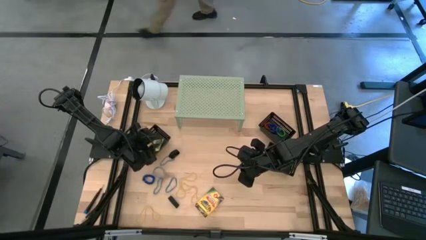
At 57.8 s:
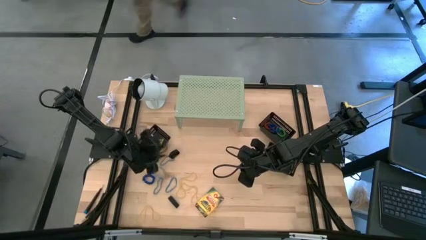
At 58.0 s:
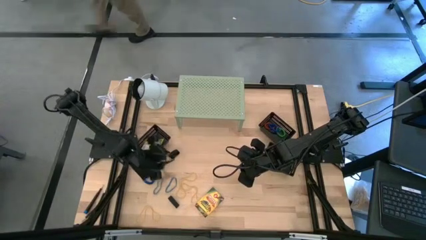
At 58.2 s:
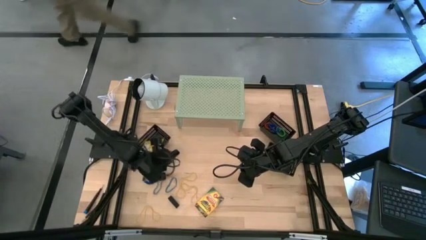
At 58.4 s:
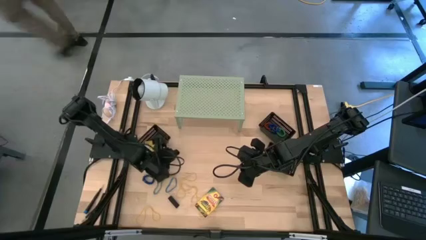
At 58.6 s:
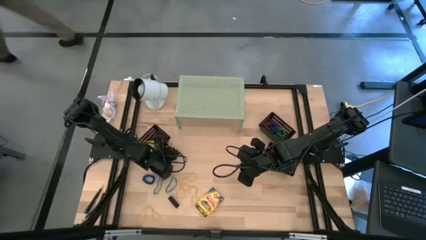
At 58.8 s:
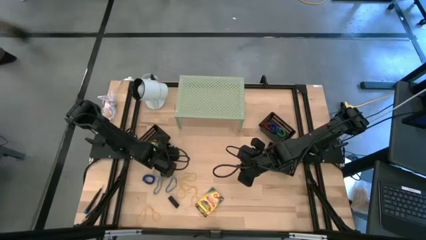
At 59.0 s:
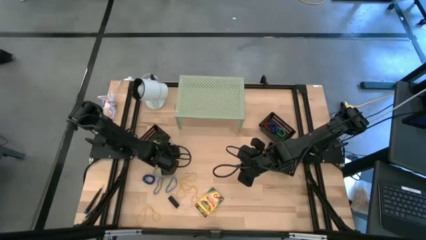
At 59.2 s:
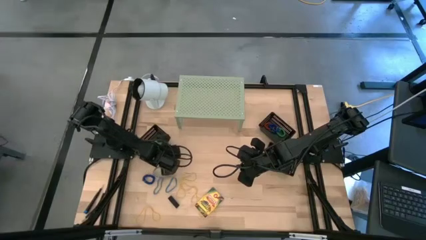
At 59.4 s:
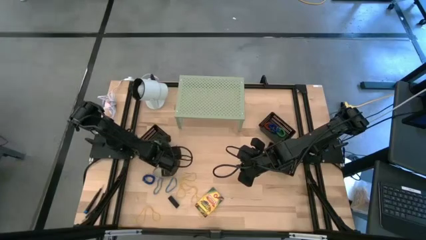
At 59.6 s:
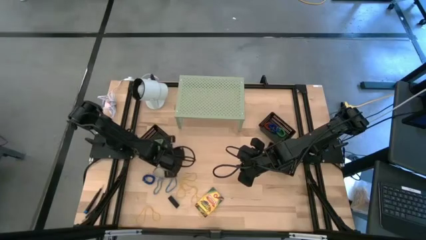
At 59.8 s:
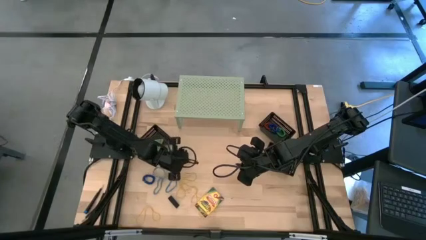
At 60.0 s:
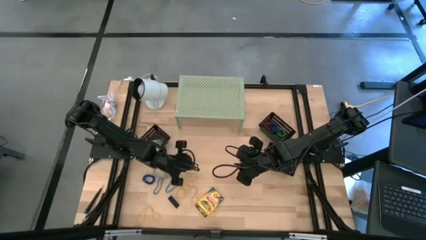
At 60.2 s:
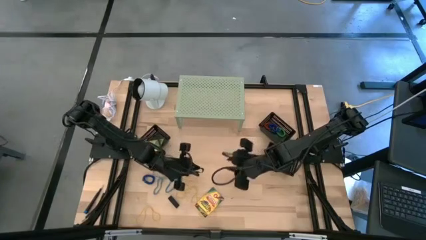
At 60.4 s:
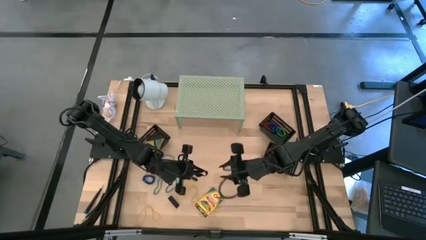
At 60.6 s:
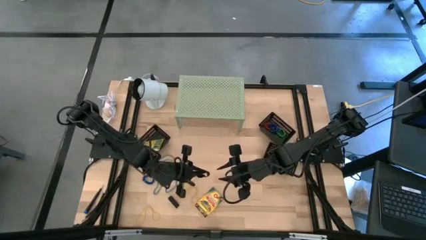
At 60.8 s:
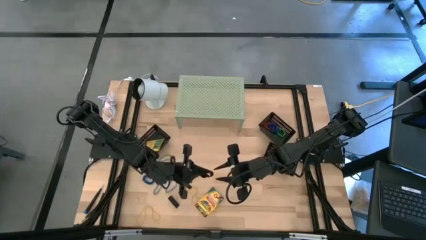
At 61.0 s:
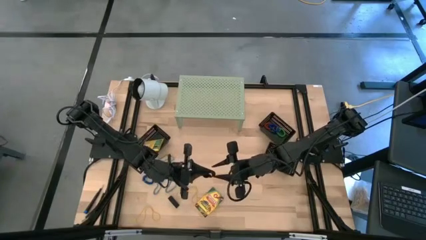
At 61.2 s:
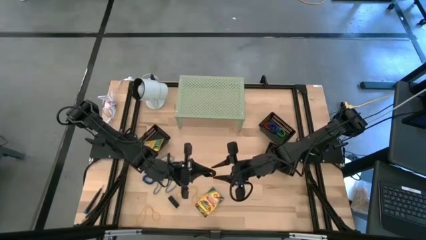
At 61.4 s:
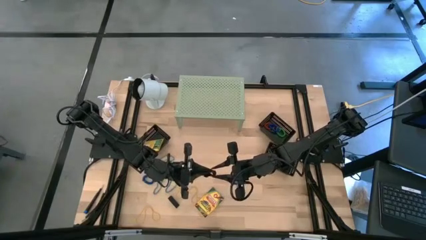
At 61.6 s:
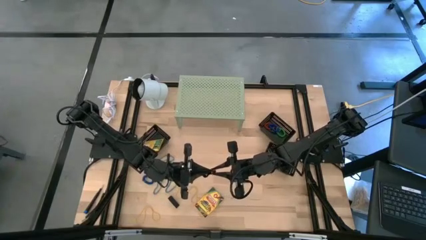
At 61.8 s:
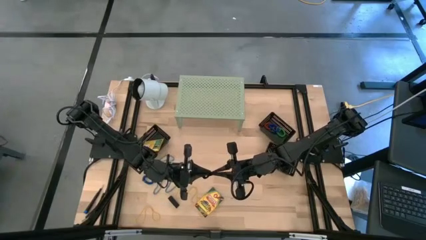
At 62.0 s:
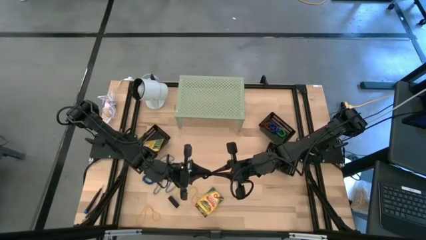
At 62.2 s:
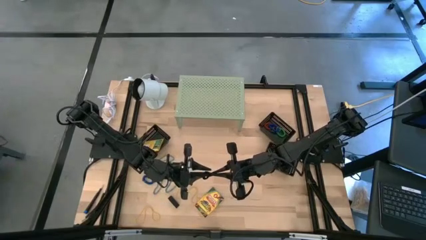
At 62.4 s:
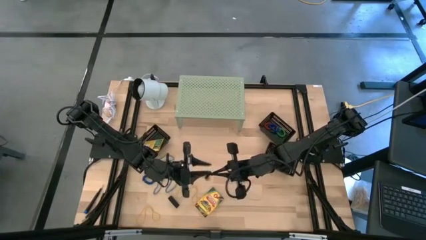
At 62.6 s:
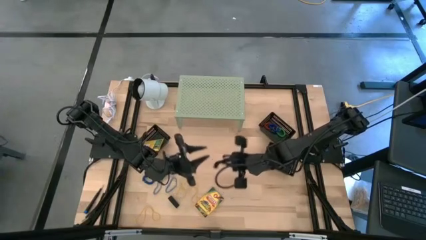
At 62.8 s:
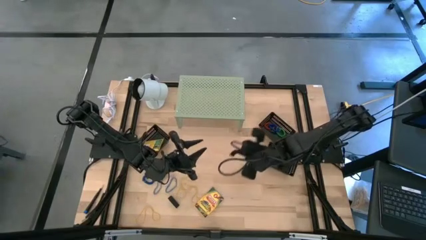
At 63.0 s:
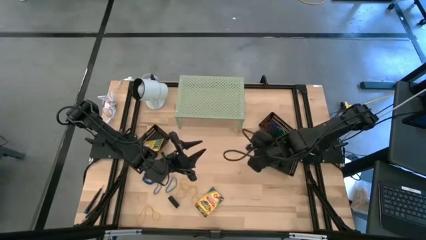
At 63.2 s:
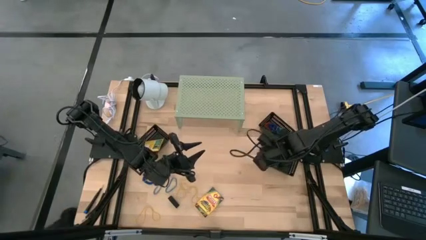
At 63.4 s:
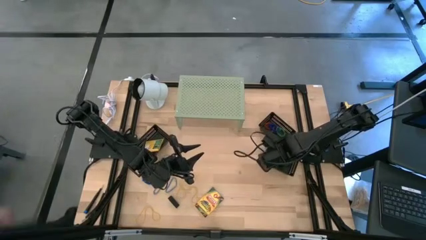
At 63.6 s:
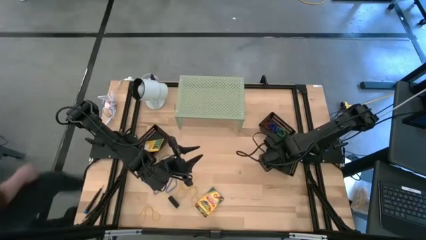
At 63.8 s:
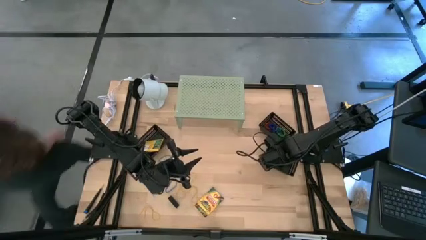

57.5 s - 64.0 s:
Task: Pick & Place Office Desk Supplies
Put the black rubber band into the bottom right black bin

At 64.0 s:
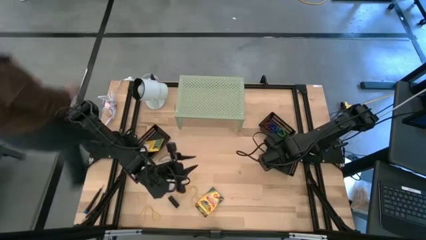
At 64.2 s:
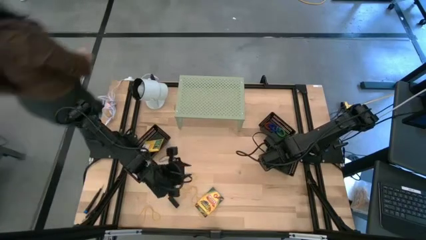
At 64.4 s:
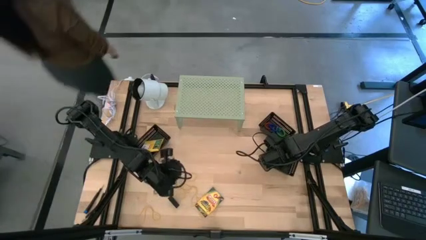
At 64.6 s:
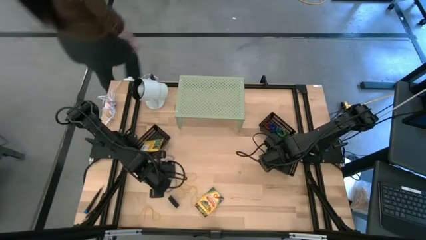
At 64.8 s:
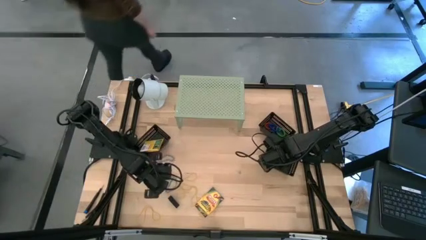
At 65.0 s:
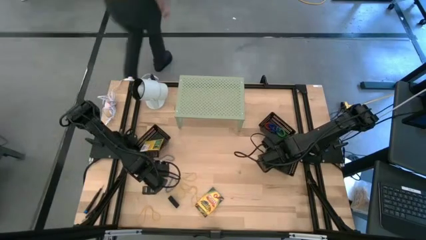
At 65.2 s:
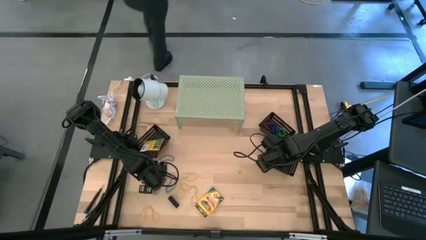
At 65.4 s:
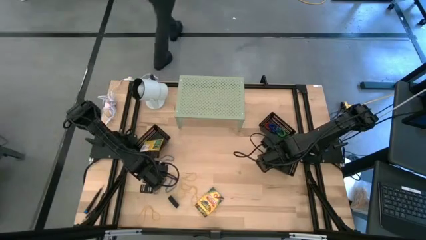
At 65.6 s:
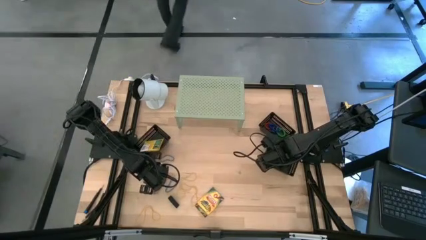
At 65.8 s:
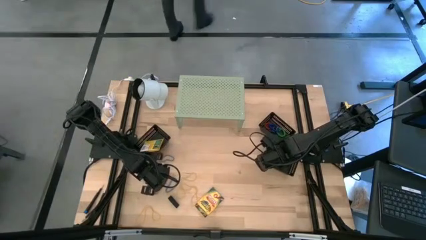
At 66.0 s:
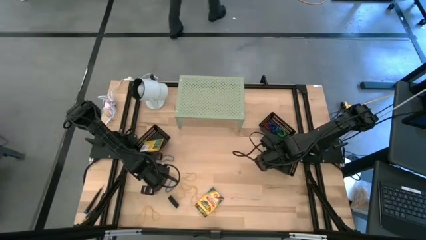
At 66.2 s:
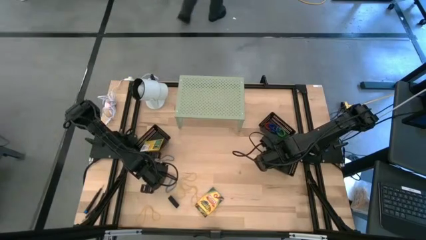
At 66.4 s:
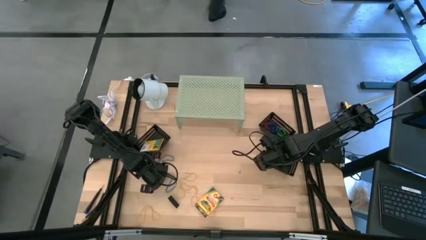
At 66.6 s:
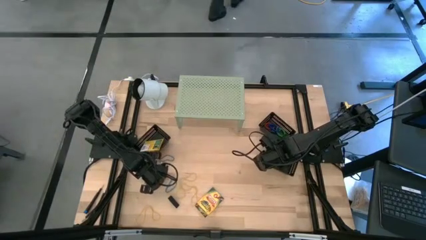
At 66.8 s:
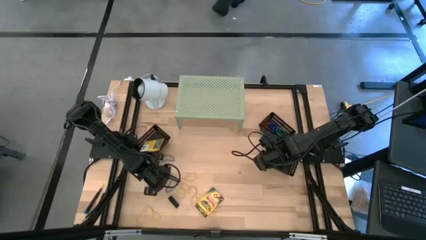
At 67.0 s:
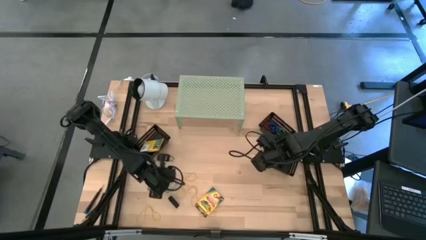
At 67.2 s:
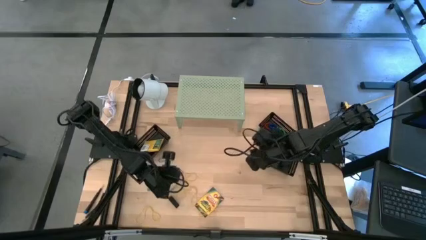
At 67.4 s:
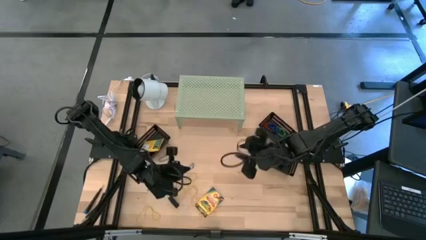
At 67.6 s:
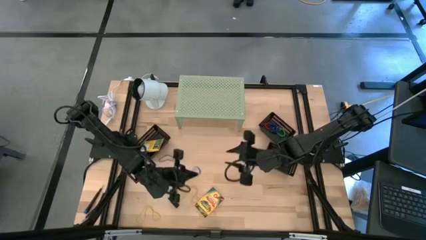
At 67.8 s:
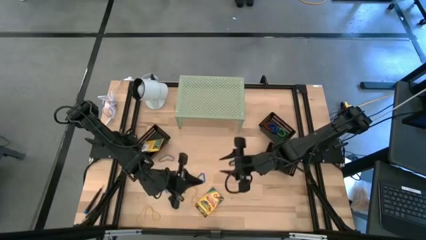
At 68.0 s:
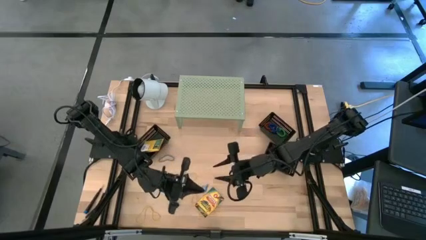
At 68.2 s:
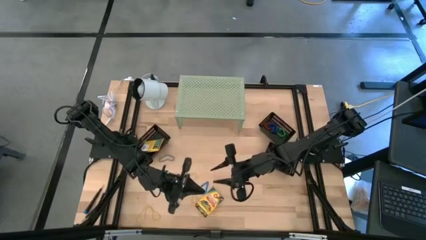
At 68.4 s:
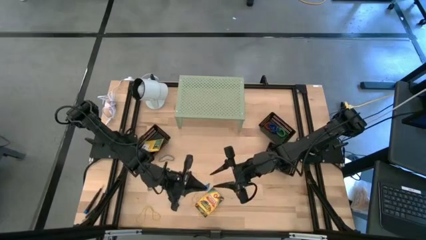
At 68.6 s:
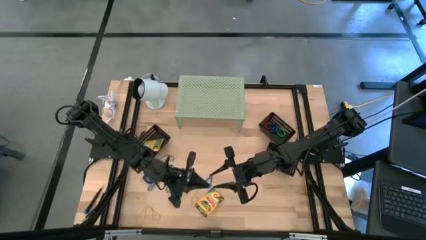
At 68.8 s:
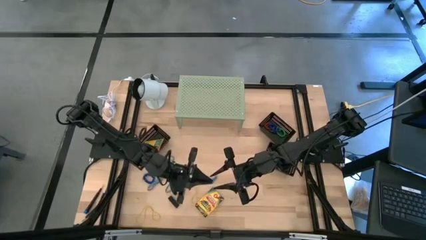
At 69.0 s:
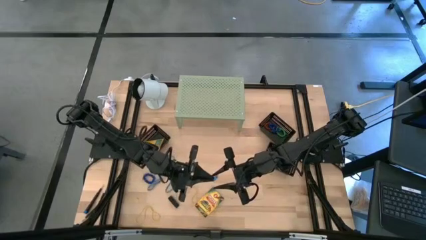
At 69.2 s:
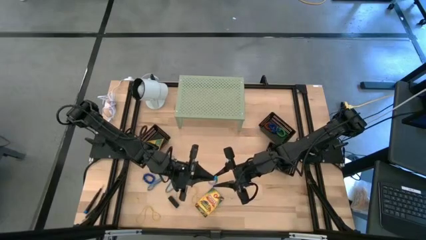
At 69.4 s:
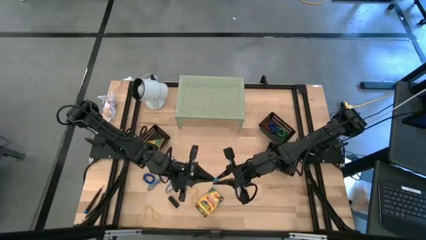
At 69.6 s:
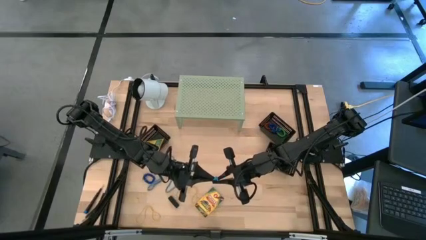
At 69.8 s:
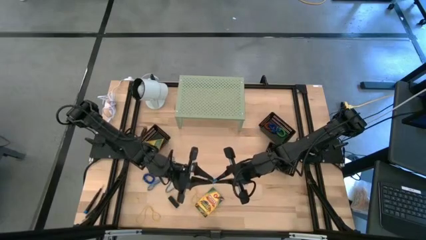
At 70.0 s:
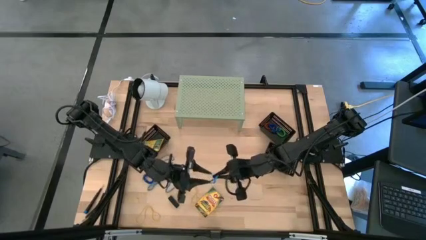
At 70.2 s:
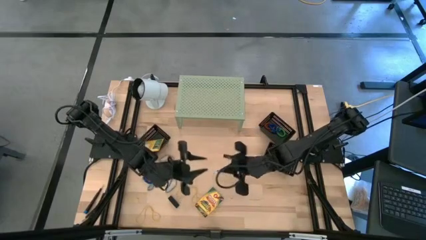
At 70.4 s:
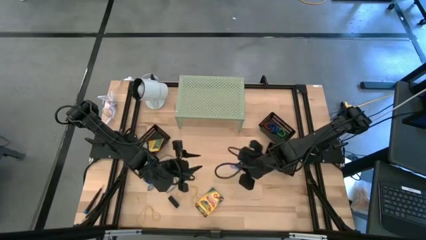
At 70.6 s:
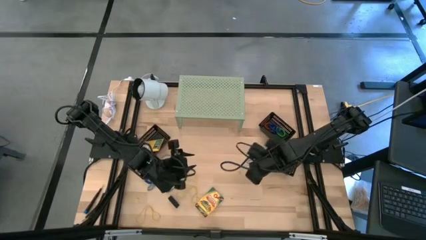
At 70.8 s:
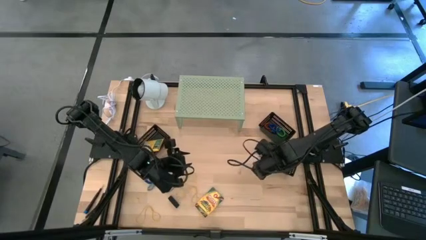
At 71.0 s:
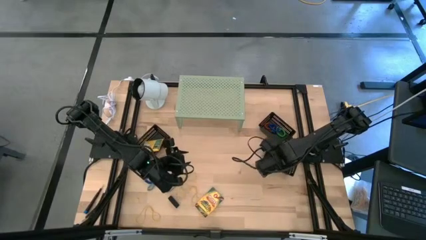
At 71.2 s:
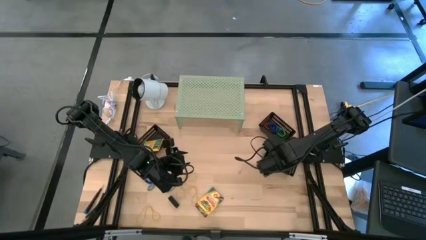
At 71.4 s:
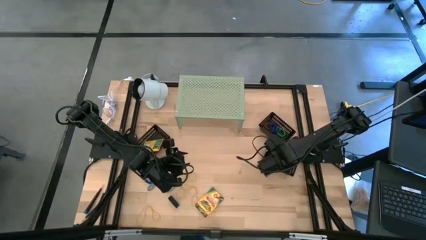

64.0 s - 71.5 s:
Put the blue rubber band into the bottom right black bin

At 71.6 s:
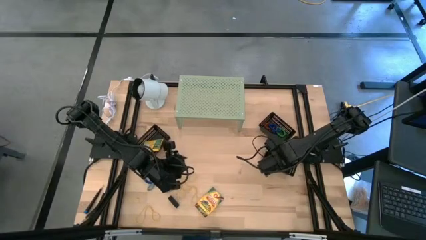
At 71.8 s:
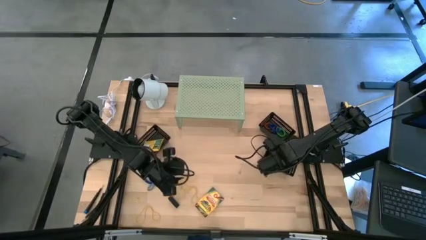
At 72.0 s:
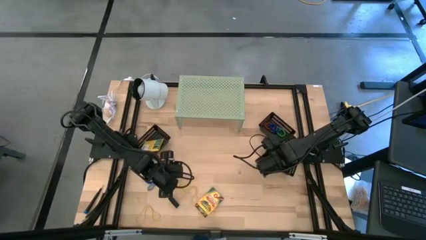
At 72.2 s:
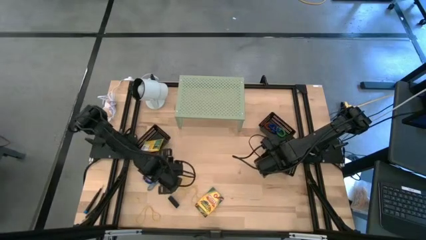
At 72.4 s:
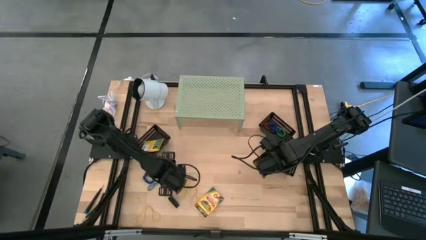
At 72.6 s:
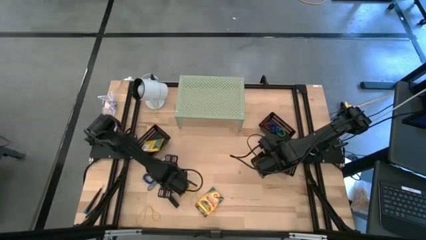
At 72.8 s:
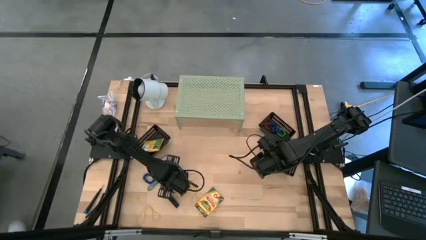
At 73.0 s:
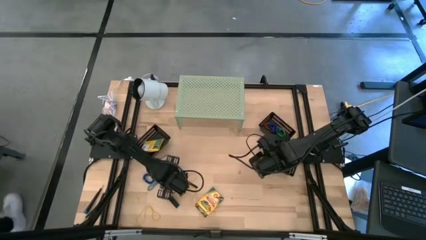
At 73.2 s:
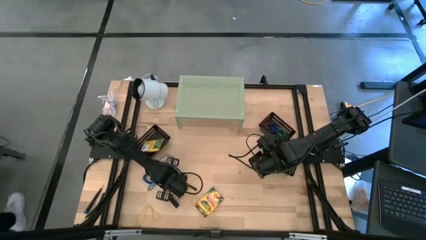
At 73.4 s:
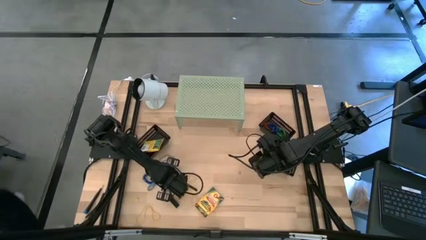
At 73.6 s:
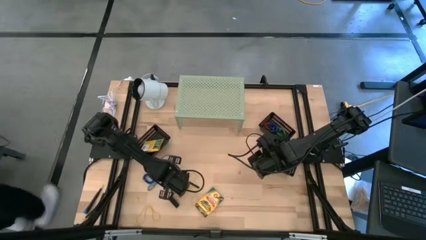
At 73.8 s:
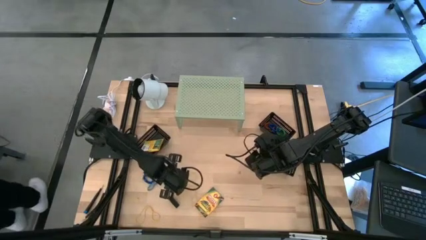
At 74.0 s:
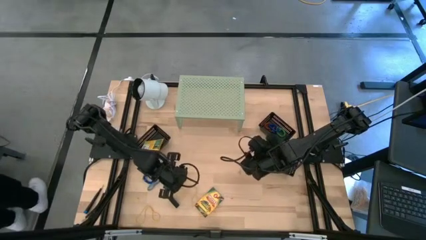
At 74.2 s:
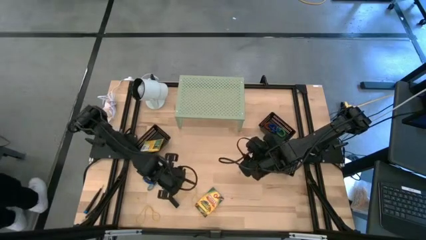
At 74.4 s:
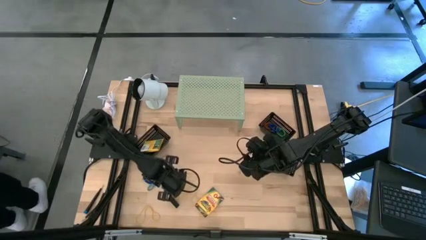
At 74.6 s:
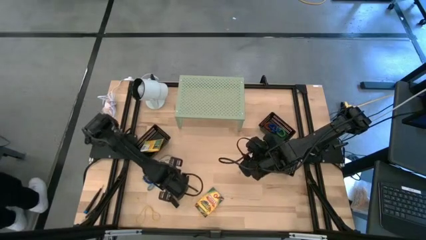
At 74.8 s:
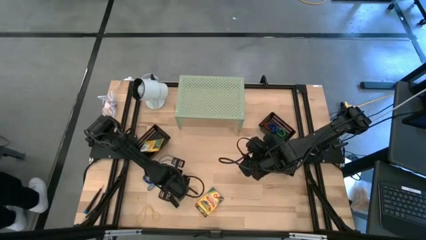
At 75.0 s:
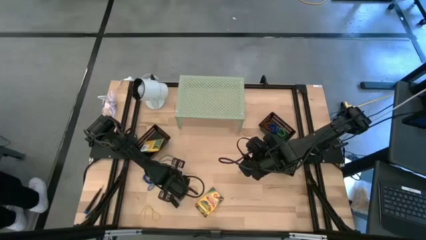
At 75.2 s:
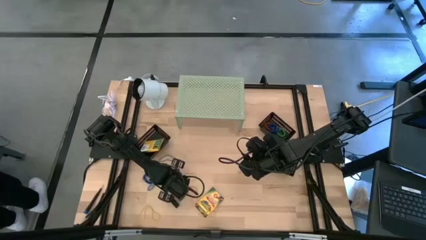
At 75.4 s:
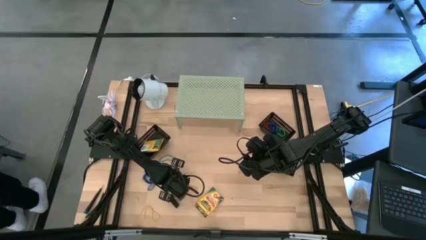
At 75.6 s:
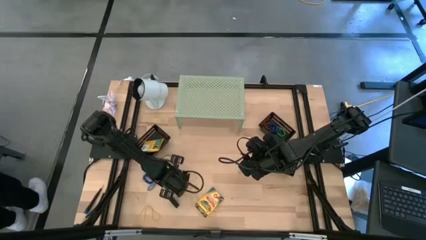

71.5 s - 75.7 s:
Put the blue rubber band into the bottom right black bin
